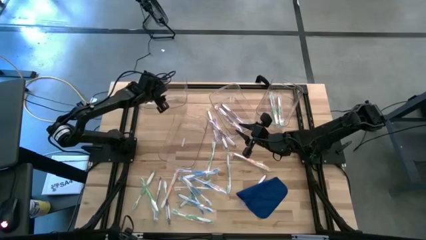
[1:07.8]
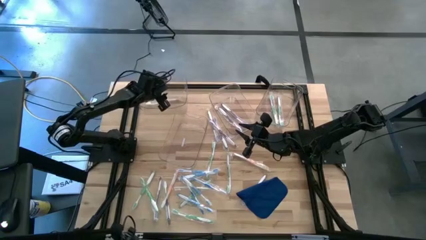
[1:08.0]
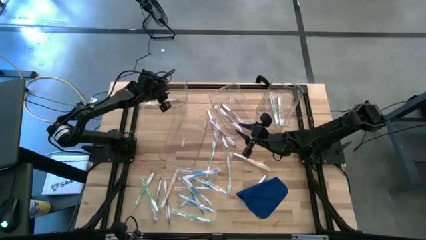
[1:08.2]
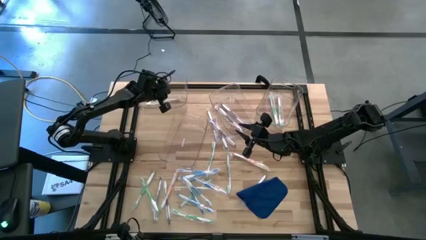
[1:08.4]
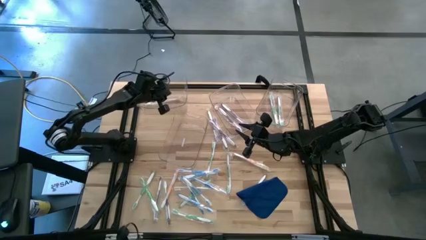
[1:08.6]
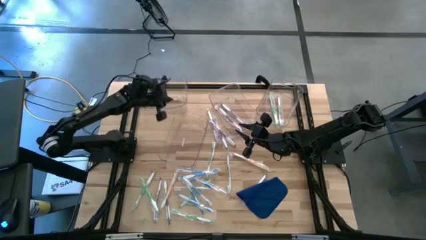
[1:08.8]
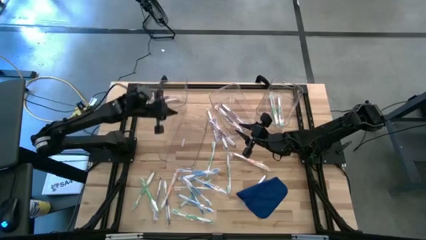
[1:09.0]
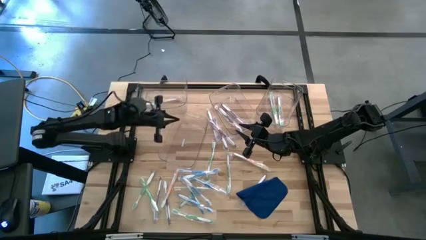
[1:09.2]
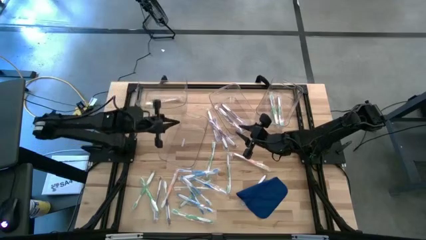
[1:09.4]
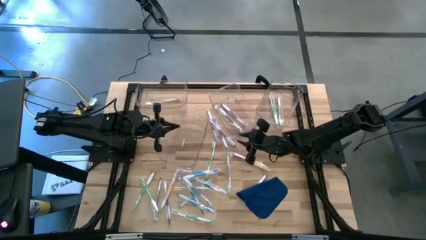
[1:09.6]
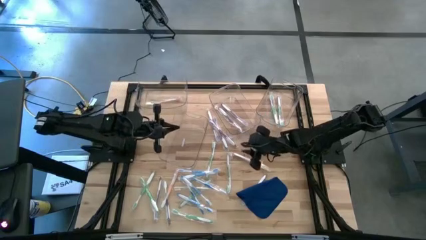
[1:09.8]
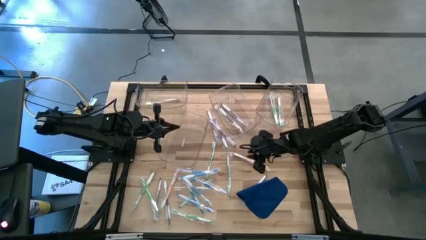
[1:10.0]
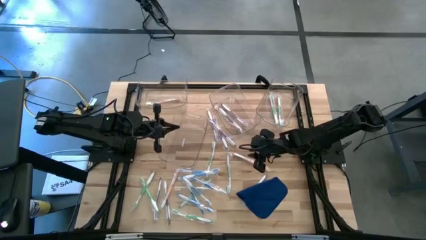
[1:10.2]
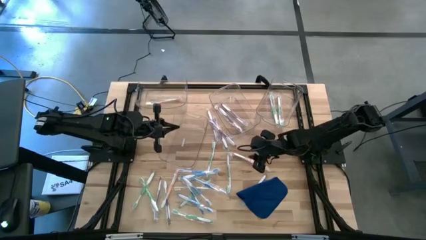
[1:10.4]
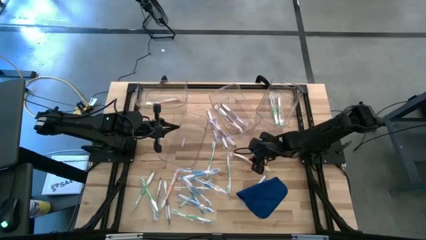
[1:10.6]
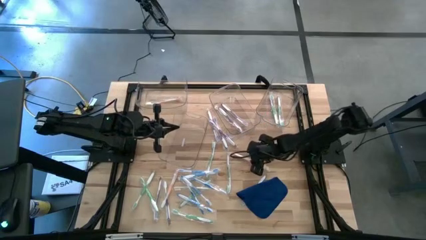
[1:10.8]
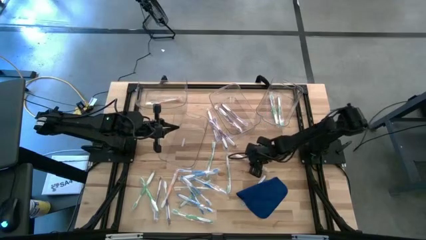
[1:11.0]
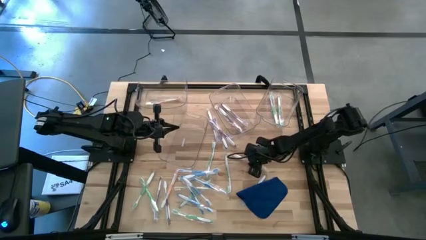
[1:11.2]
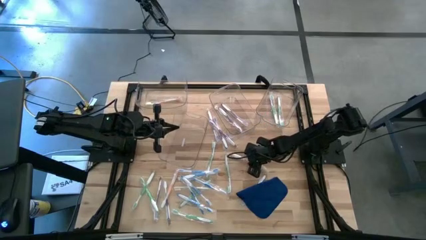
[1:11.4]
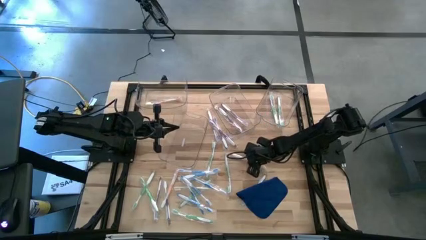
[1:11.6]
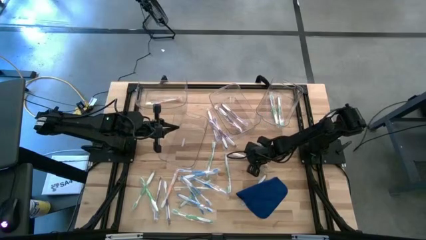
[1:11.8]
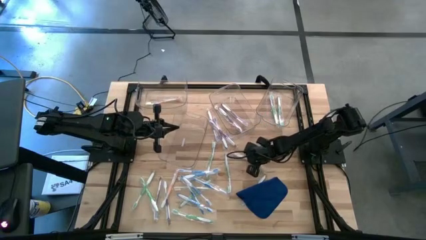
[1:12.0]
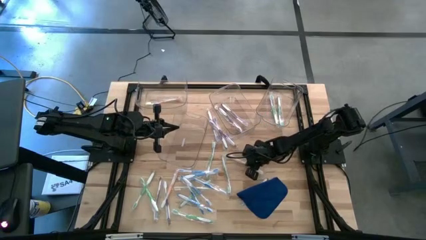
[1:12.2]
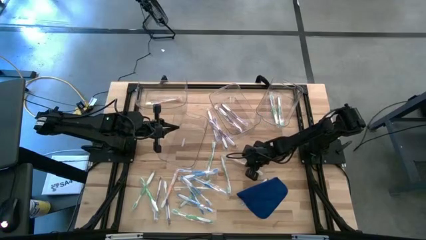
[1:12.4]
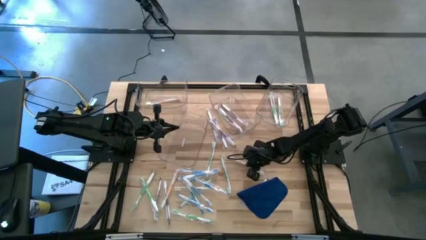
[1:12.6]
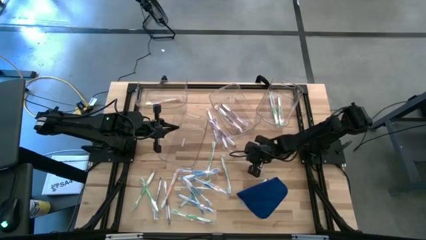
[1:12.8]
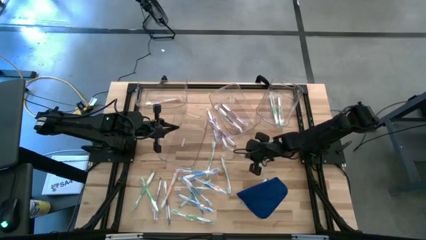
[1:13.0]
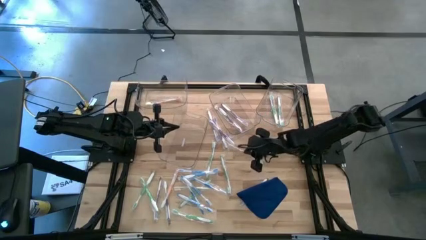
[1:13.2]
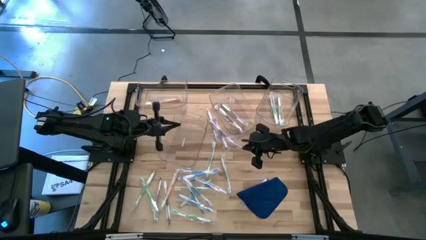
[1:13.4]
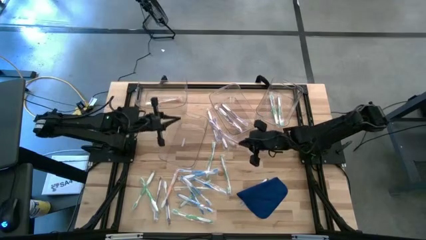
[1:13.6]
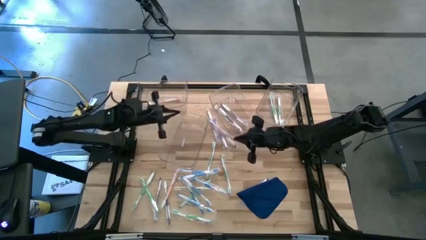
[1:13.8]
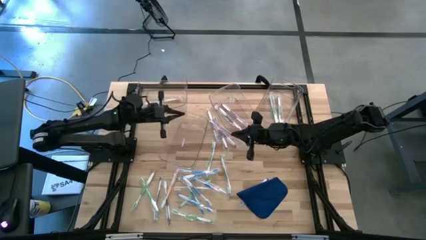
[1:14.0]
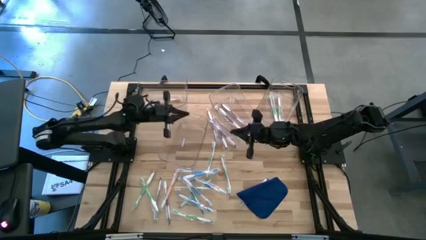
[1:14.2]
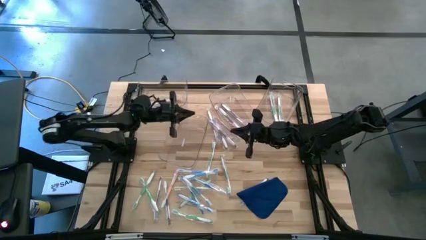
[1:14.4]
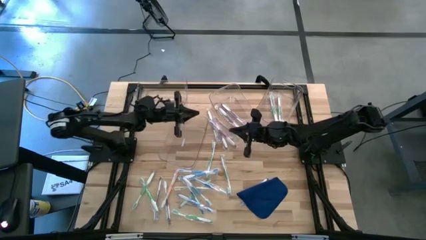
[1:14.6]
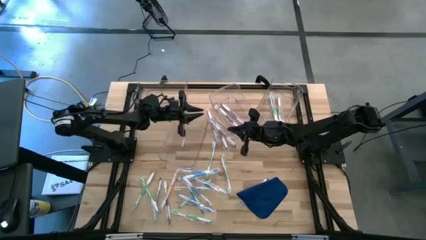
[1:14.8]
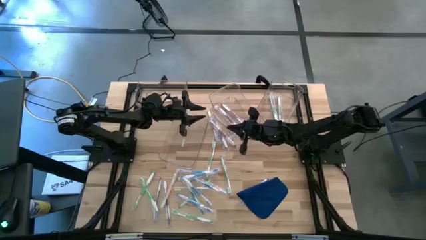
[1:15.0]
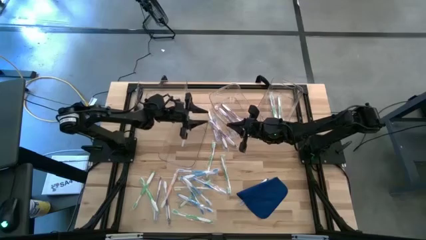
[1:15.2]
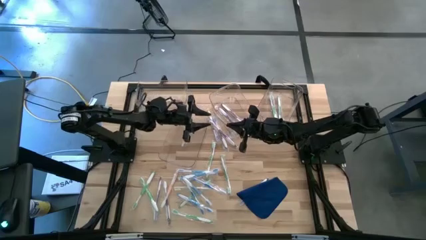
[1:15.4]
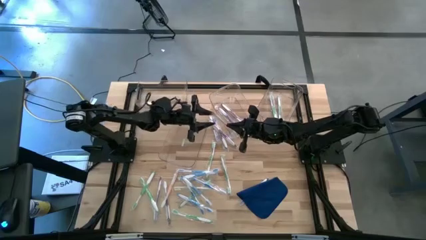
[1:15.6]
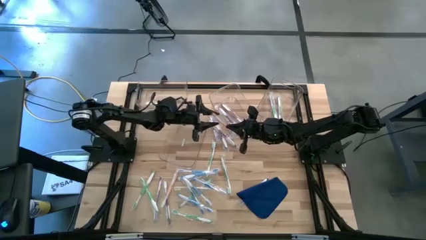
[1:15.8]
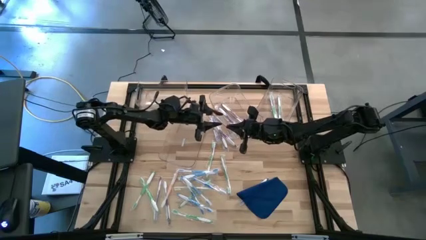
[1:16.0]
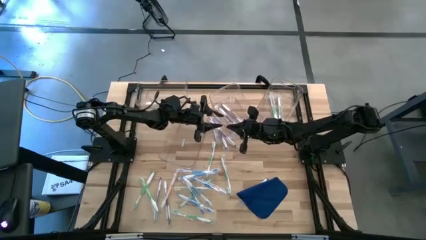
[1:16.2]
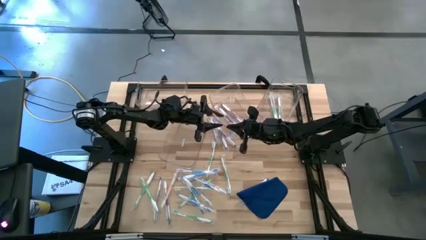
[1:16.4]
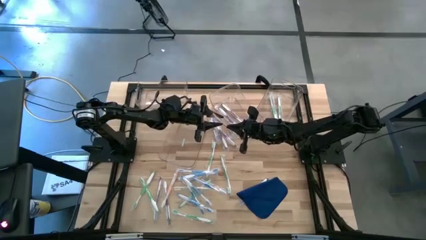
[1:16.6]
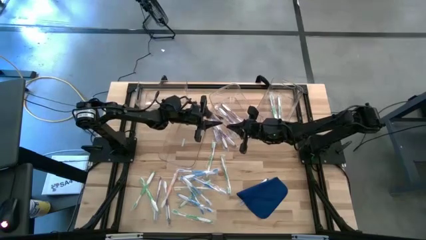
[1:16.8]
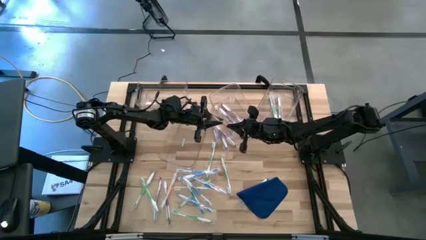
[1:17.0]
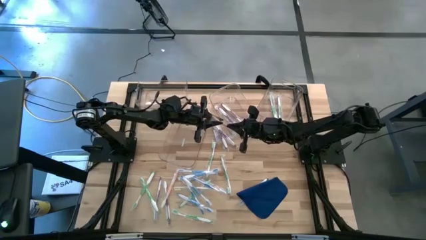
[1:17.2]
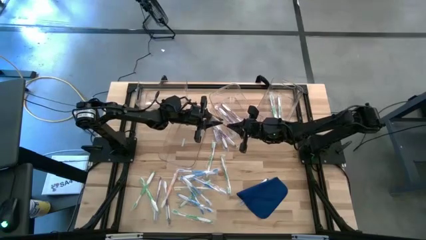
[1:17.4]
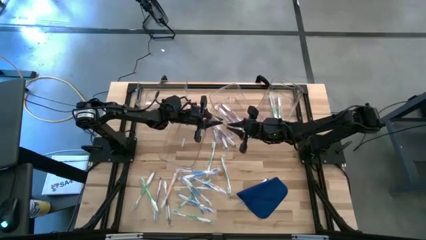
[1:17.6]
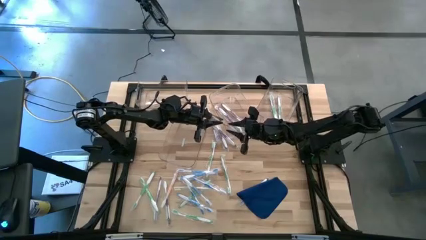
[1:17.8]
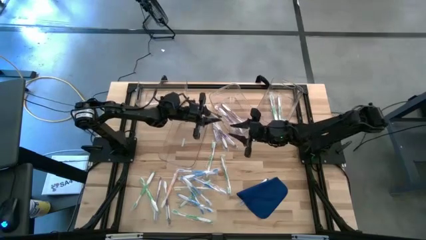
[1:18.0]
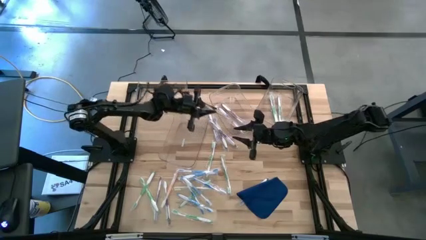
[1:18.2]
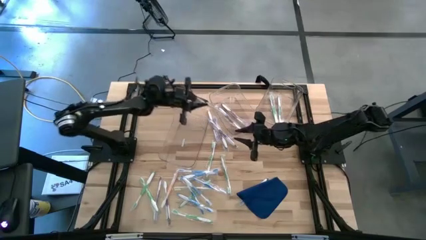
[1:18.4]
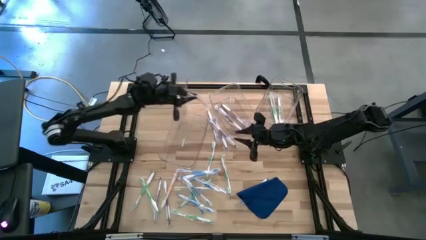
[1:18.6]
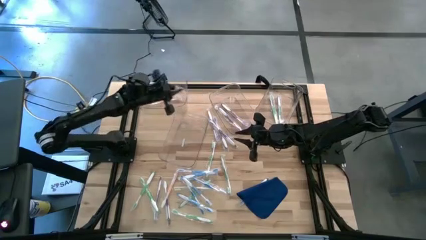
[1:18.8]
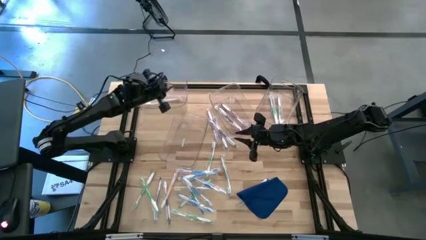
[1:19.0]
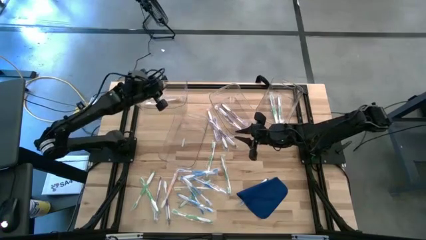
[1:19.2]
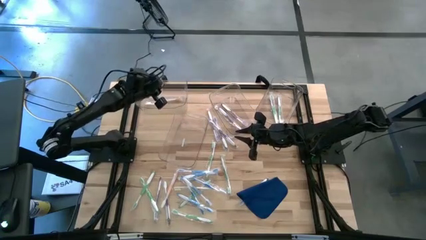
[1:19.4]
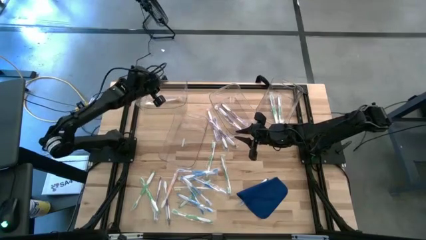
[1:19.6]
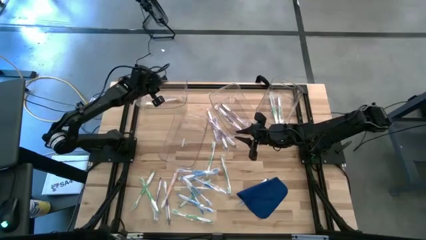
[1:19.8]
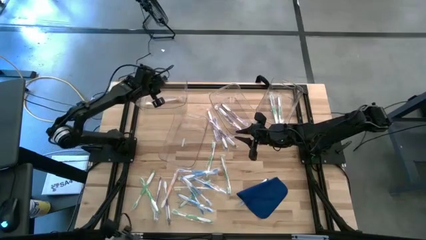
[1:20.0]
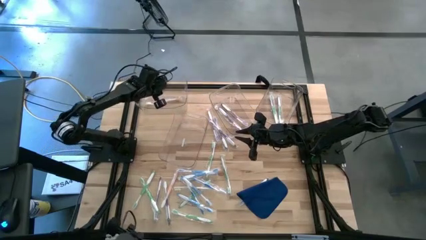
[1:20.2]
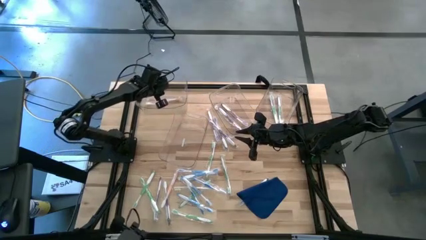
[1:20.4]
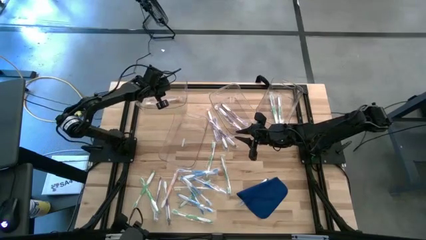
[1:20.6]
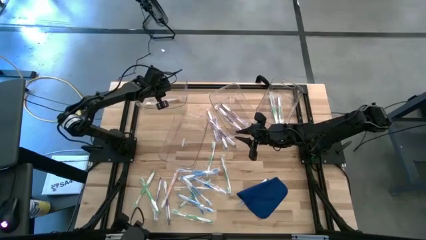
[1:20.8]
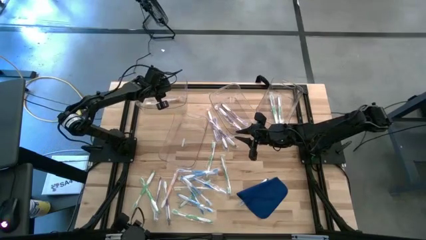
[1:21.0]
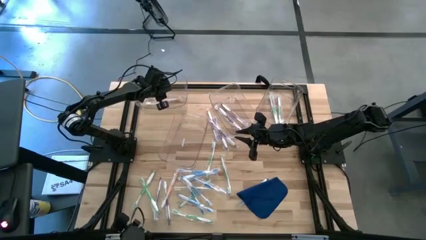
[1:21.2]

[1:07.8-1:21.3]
Task: Pick & Place Toothbrushes
Put the orange toothbrush into the top left transparent bin
